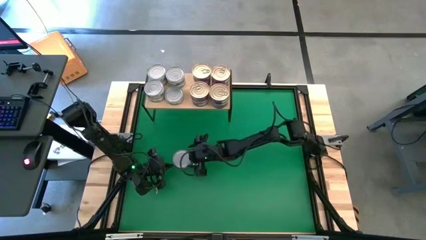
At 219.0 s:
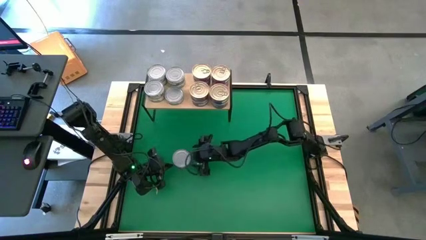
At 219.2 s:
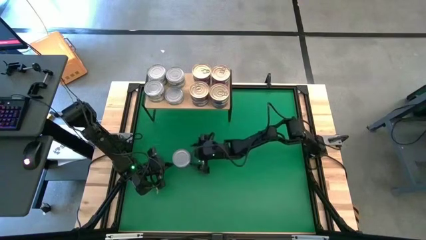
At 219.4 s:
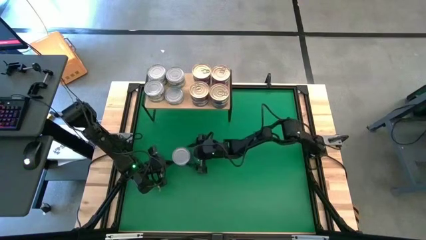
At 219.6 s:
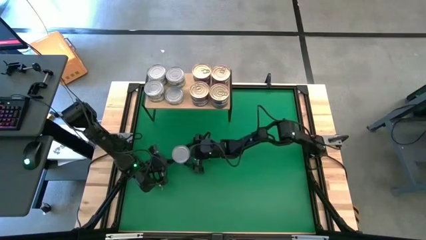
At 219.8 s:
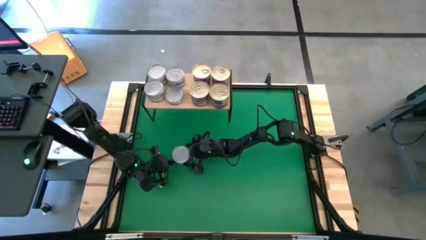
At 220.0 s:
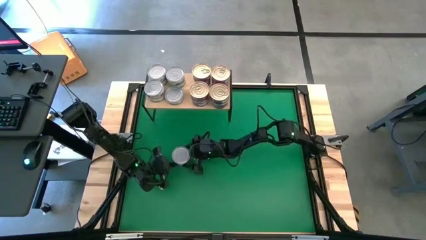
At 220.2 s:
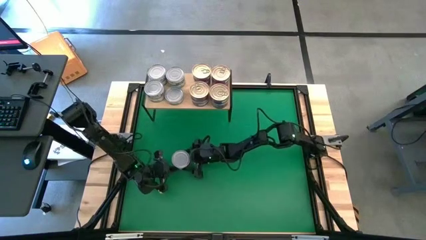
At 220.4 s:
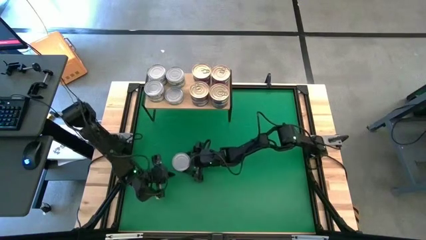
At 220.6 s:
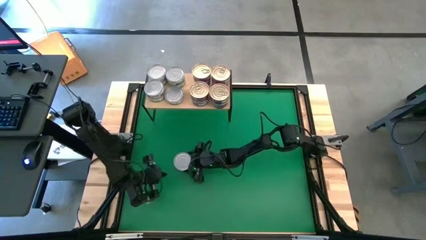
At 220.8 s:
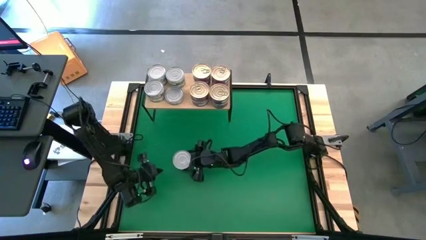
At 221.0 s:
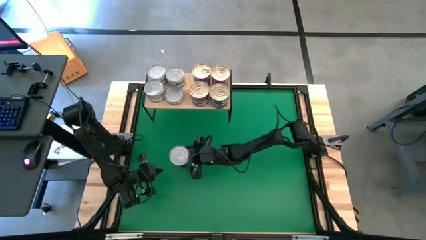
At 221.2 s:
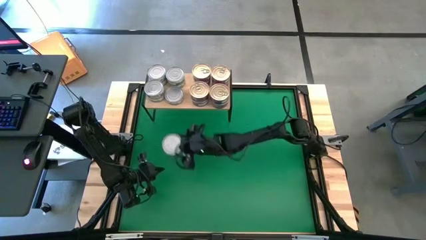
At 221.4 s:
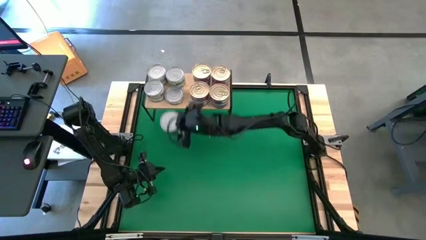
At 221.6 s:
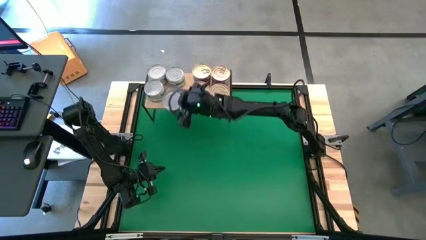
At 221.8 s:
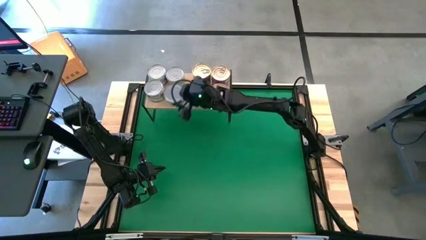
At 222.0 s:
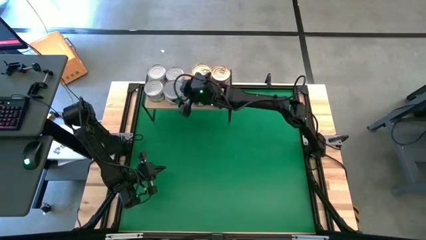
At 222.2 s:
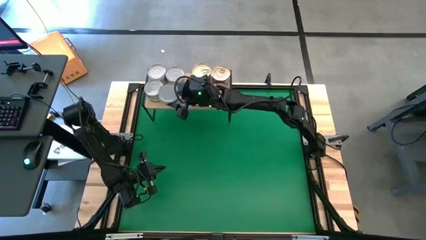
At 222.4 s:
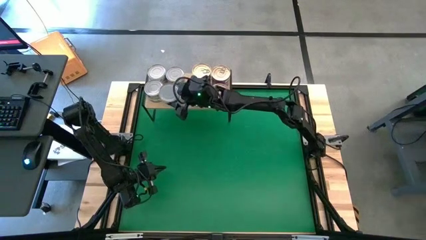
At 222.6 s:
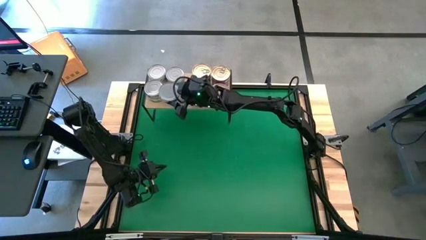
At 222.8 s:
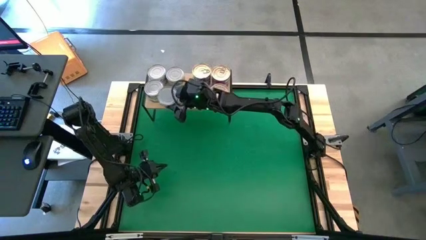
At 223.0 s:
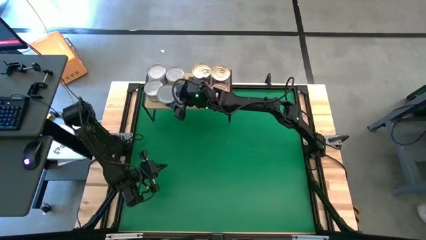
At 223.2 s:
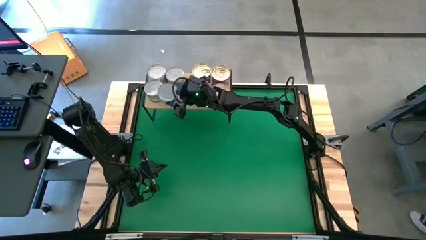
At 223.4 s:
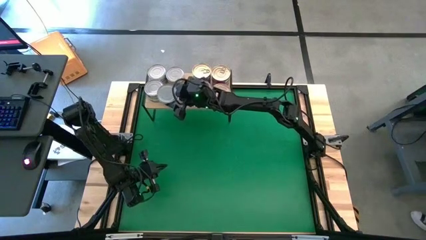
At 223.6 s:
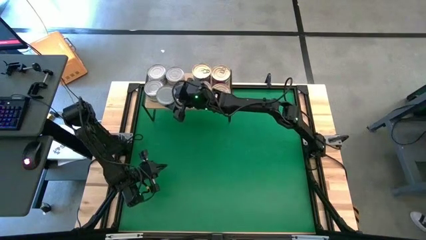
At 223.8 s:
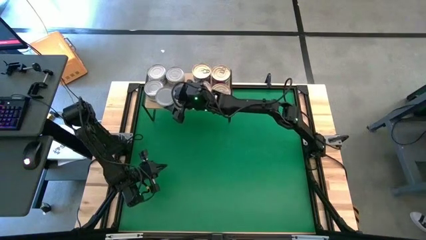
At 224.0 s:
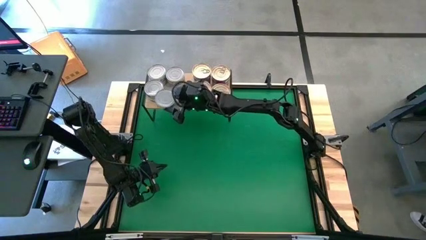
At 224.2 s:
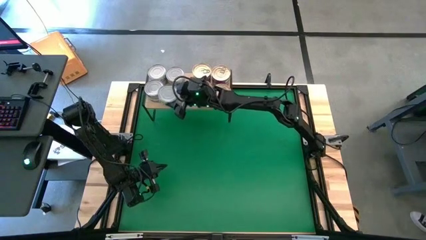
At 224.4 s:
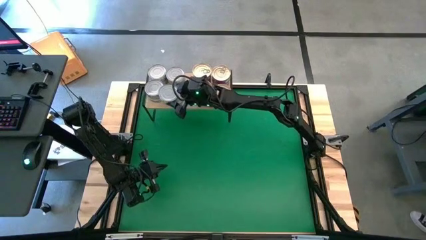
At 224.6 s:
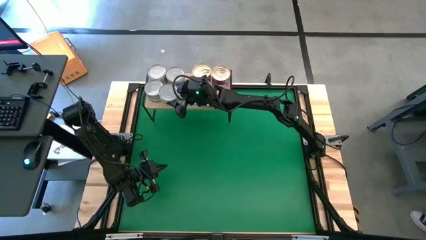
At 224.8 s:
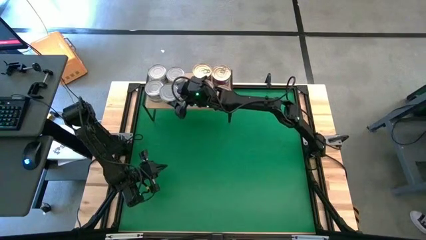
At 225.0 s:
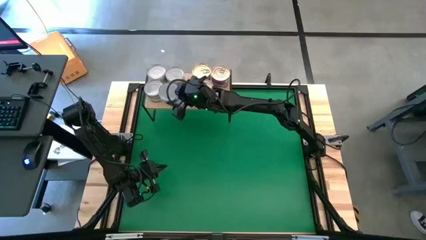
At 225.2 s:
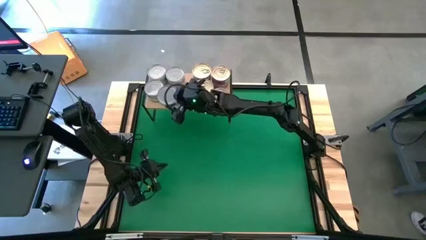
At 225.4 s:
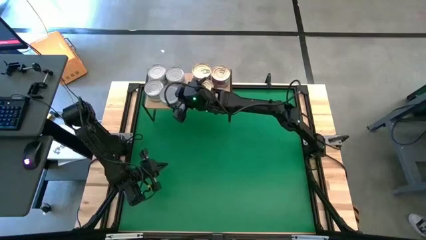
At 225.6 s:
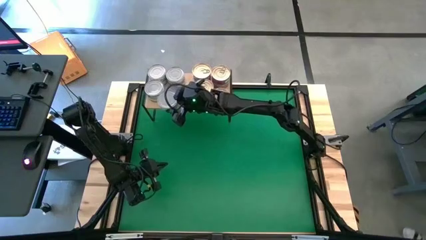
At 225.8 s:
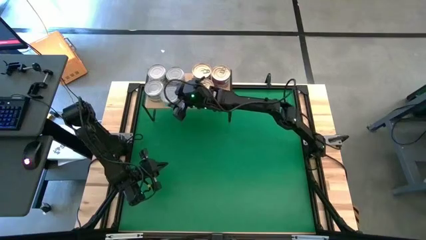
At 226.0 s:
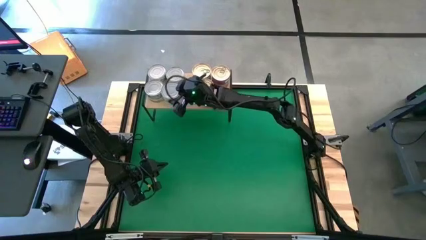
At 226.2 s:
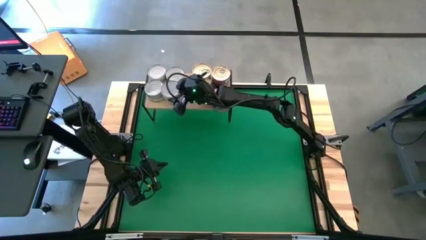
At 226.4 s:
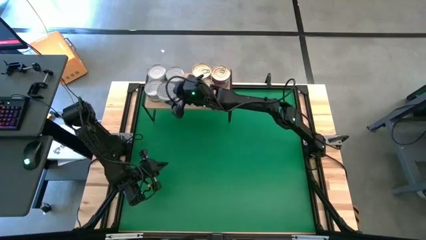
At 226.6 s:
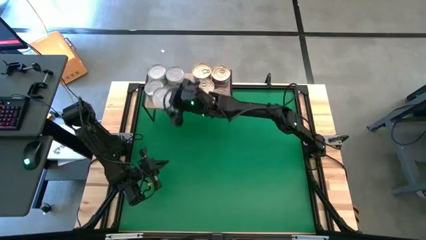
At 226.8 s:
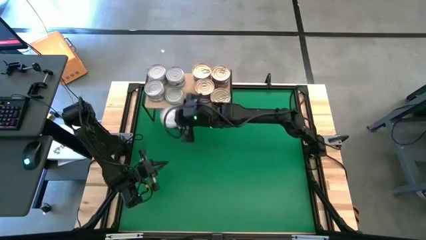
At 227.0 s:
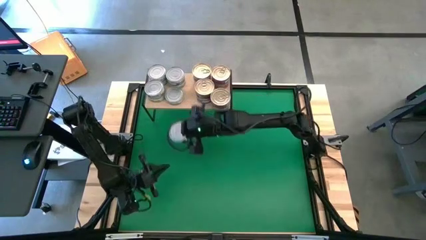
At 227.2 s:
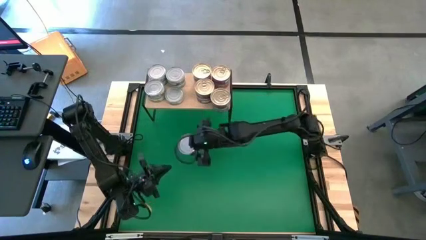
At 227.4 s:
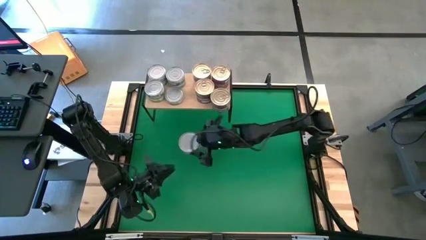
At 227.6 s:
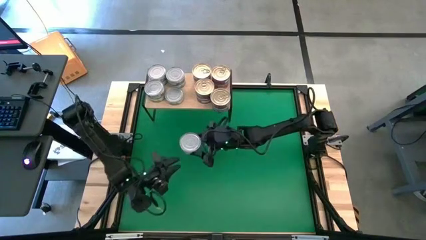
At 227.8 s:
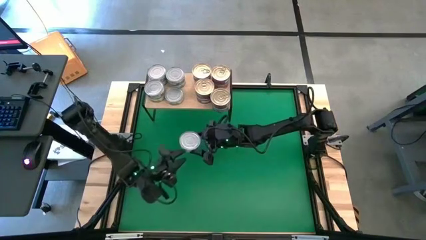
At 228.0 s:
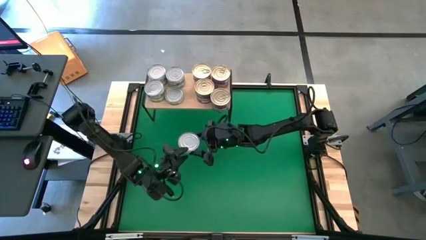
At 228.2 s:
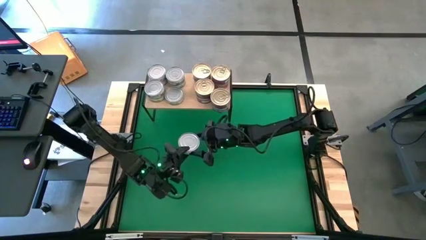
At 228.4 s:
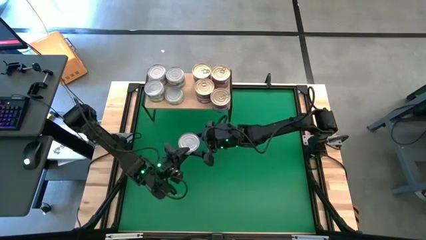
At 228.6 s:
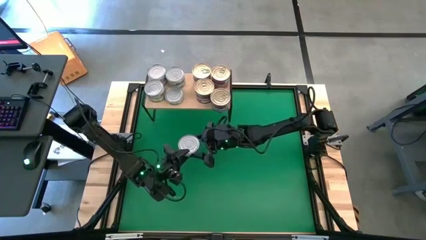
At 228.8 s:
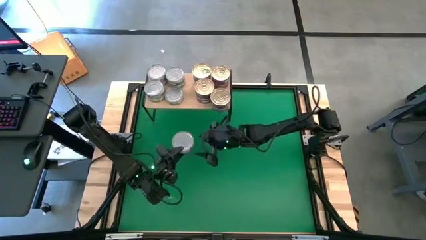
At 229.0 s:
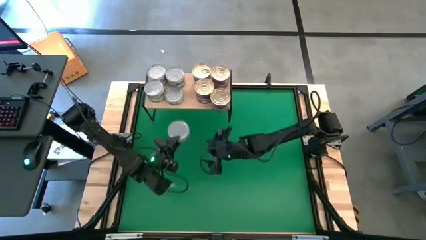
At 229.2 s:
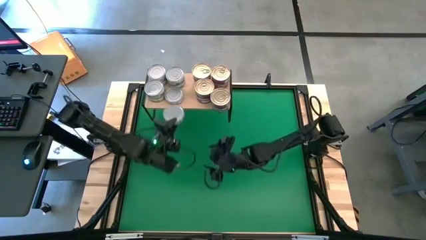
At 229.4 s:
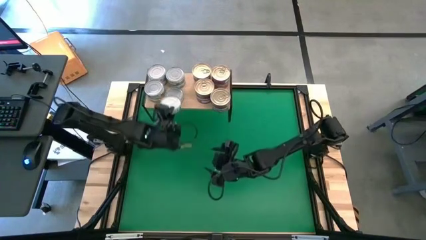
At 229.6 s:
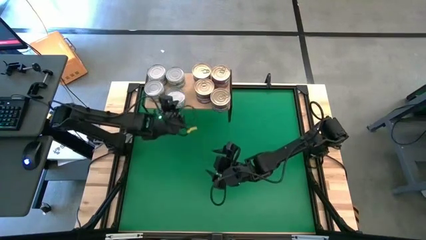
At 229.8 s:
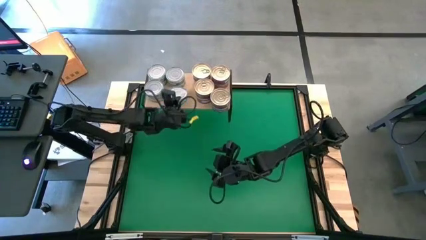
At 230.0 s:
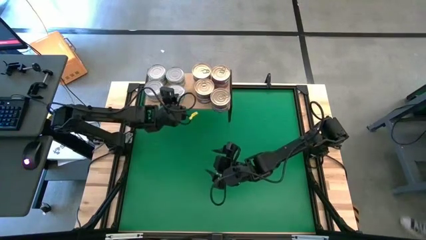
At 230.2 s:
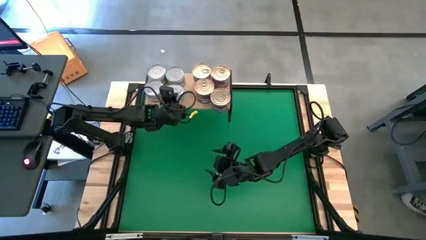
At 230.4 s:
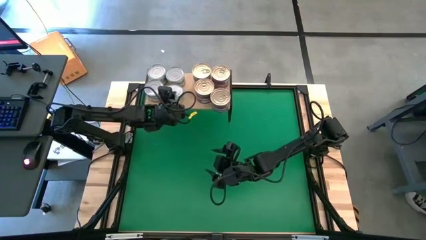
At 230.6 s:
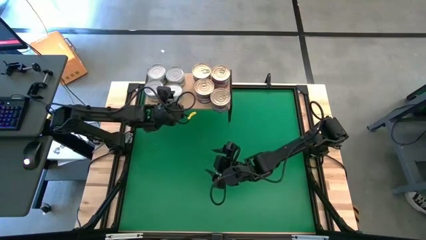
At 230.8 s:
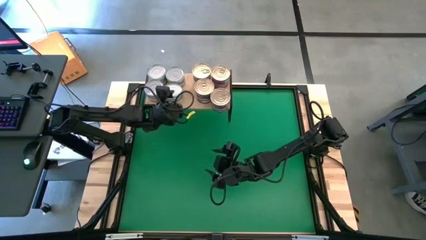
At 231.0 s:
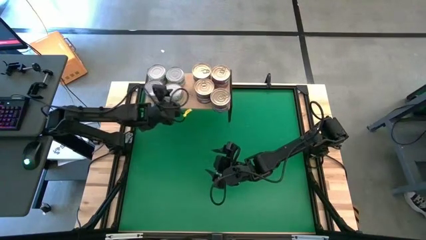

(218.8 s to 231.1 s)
Task: Stack canned seafood by type on shelf
Stack the green tuna can on the other green tuna can on the shelf

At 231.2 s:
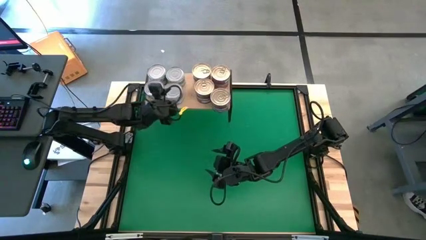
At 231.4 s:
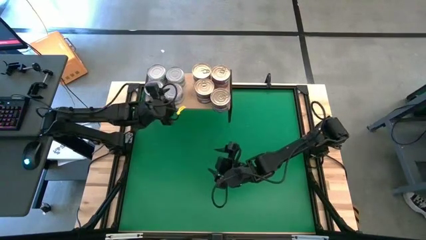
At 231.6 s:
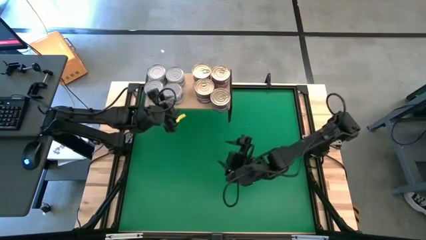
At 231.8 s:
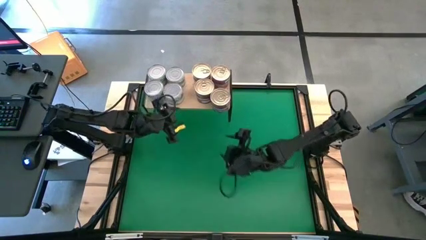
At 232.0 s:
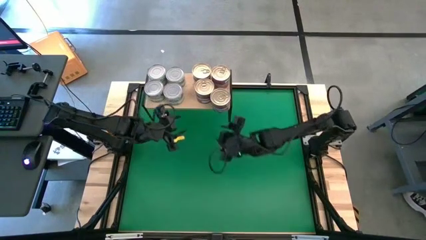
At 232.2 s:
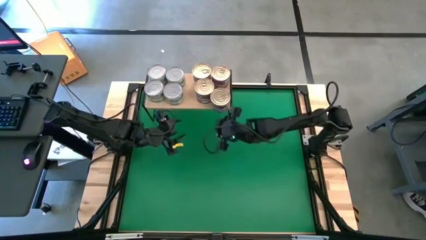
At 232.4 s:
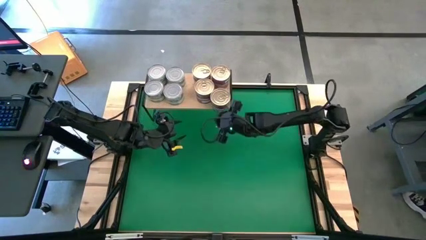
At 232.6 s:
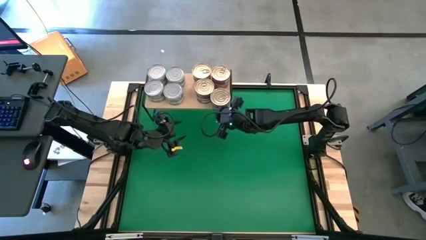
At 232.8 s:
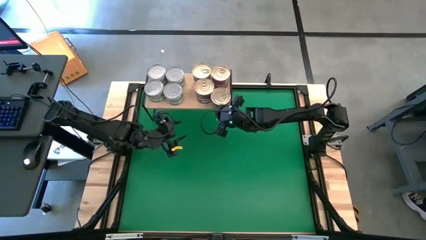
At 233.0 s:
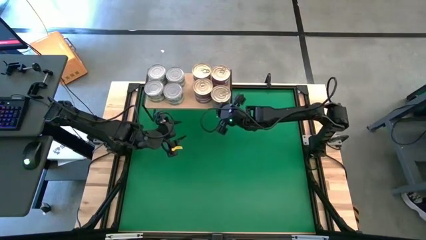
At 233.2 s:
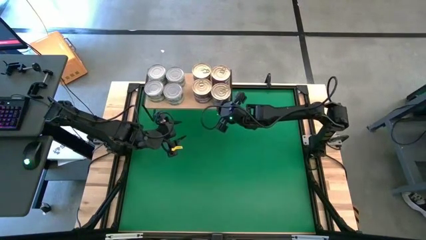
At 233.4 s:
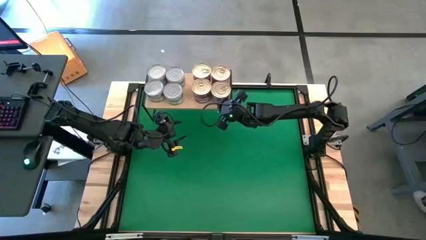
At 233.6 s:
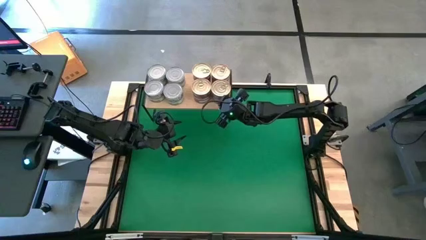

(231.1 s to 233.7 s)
Adjust the stack of blue and pink tuna can on the shelf
